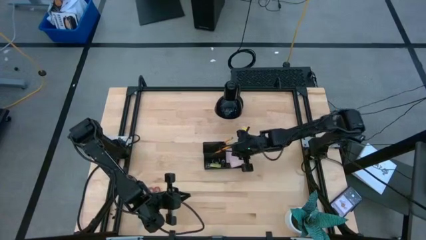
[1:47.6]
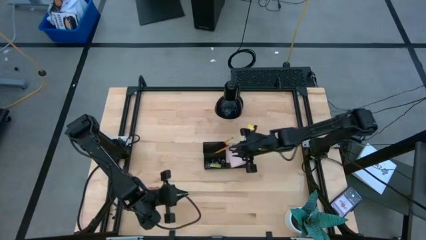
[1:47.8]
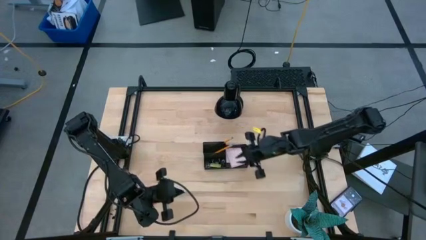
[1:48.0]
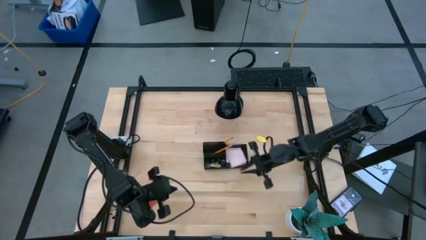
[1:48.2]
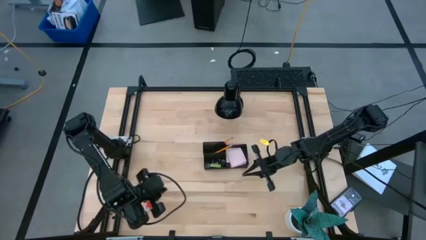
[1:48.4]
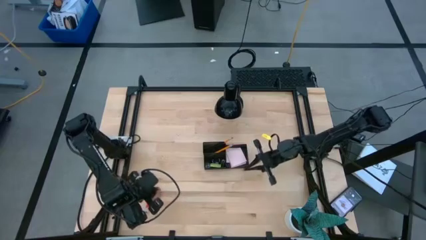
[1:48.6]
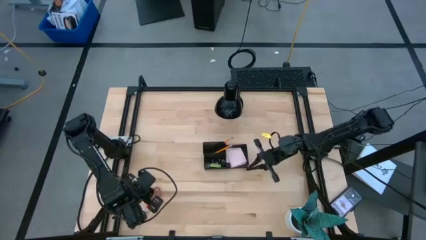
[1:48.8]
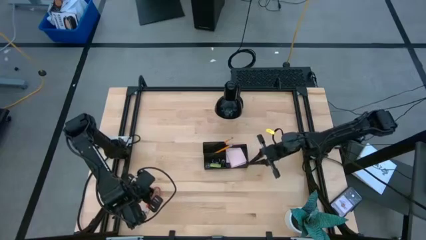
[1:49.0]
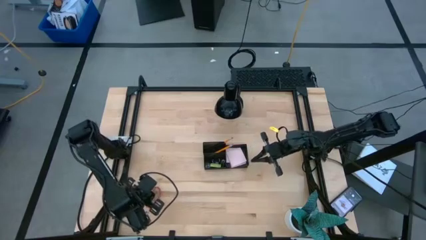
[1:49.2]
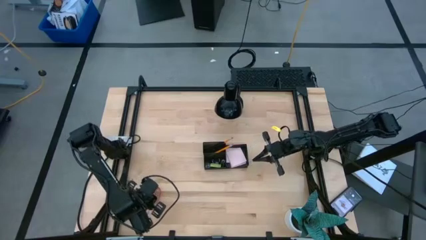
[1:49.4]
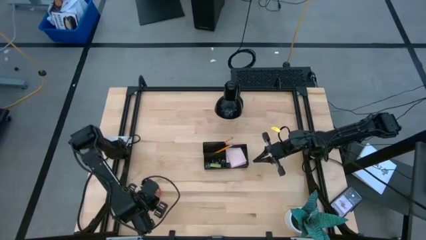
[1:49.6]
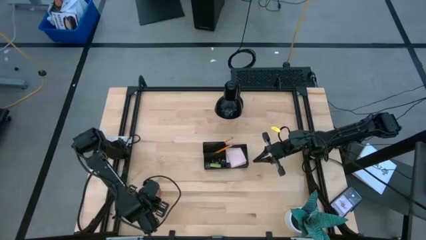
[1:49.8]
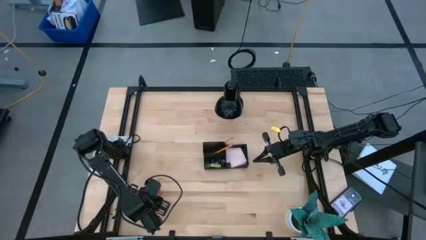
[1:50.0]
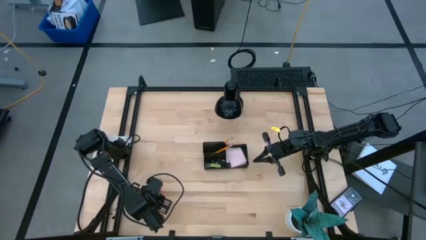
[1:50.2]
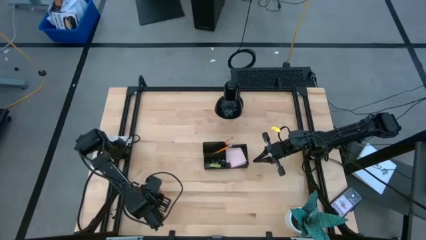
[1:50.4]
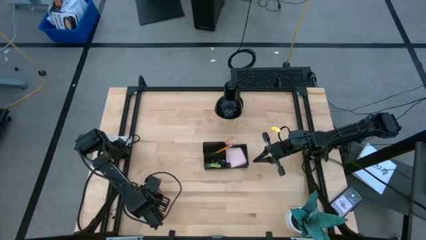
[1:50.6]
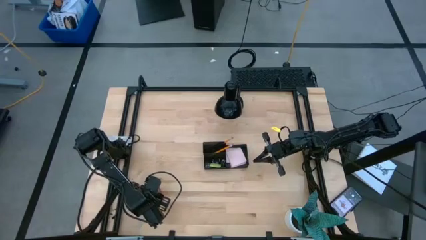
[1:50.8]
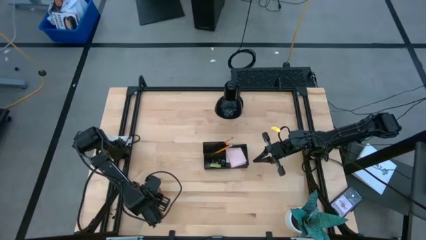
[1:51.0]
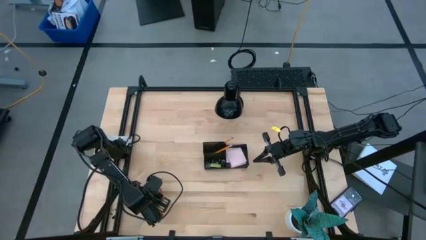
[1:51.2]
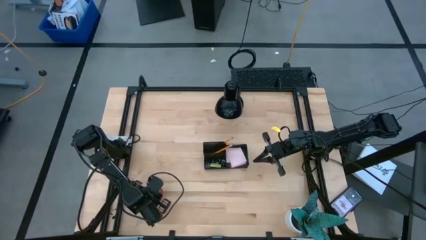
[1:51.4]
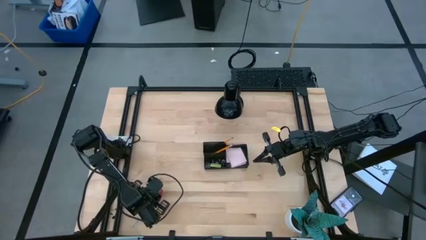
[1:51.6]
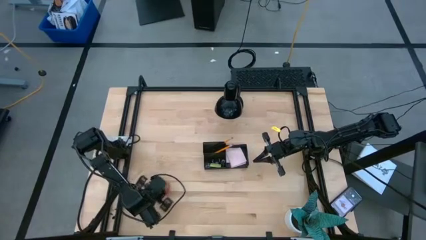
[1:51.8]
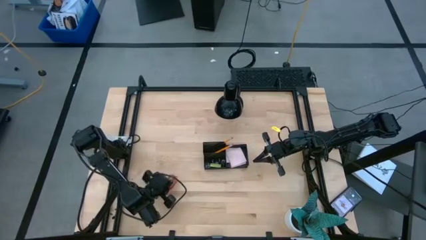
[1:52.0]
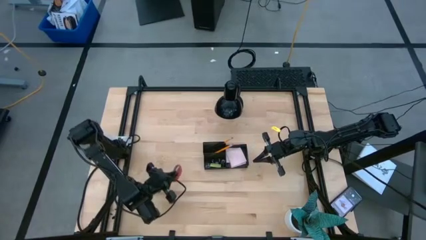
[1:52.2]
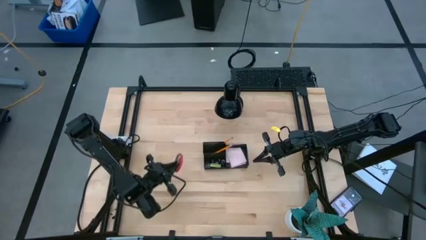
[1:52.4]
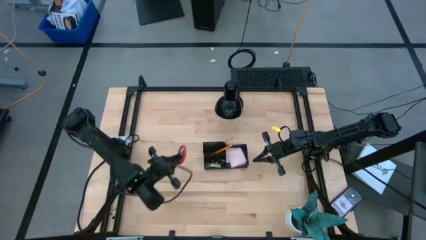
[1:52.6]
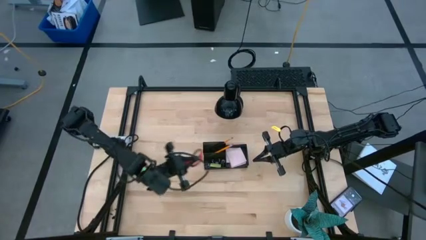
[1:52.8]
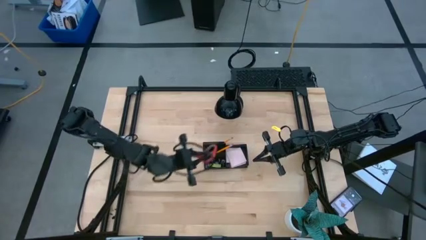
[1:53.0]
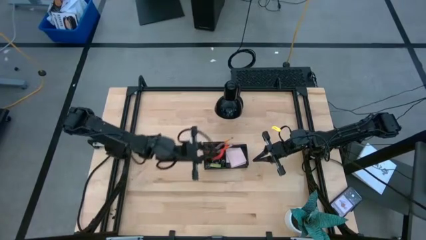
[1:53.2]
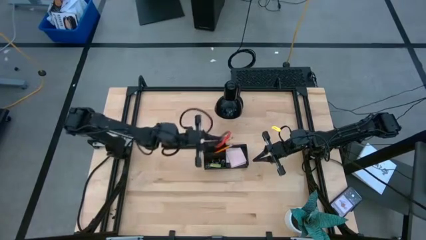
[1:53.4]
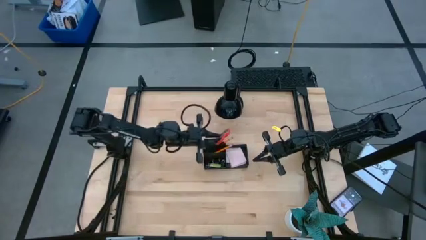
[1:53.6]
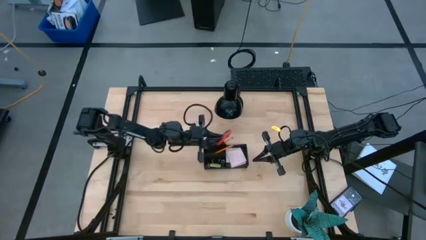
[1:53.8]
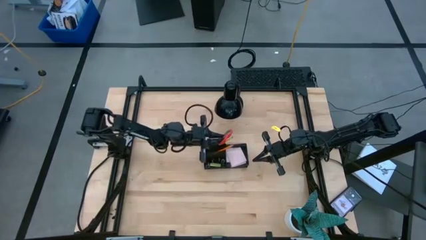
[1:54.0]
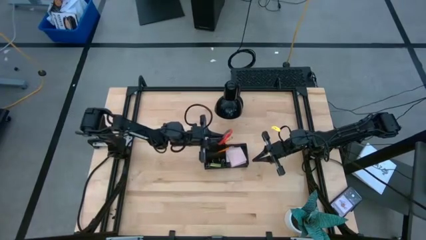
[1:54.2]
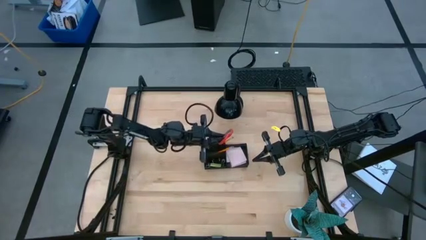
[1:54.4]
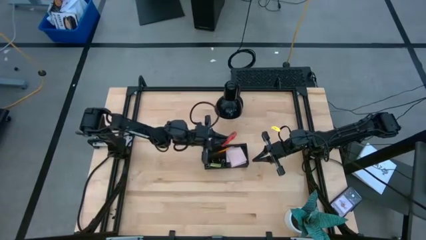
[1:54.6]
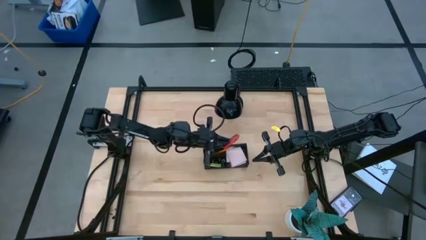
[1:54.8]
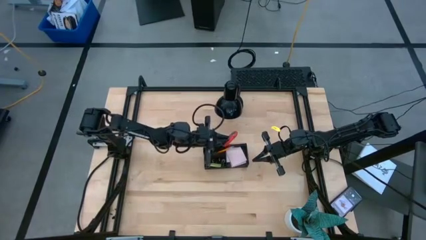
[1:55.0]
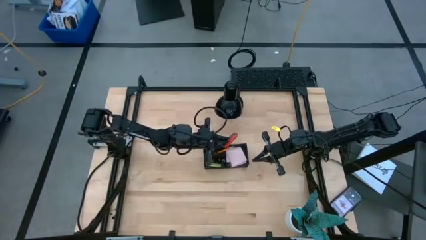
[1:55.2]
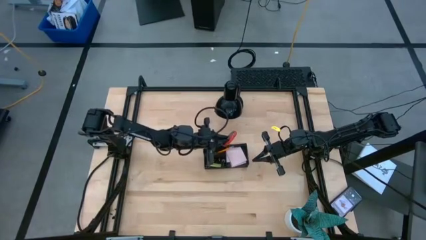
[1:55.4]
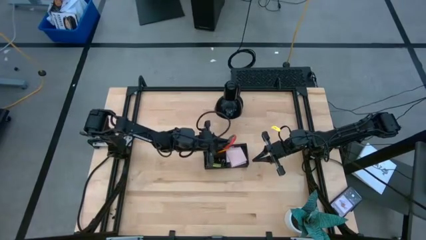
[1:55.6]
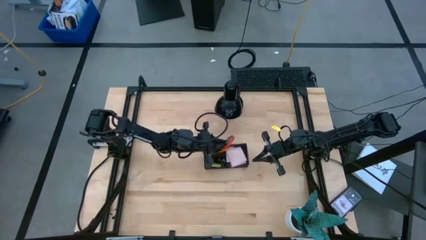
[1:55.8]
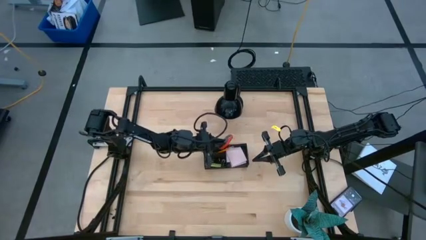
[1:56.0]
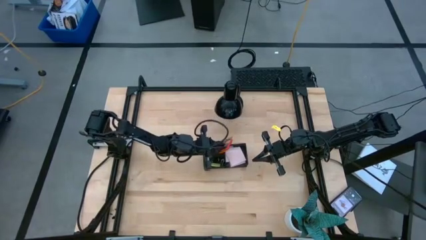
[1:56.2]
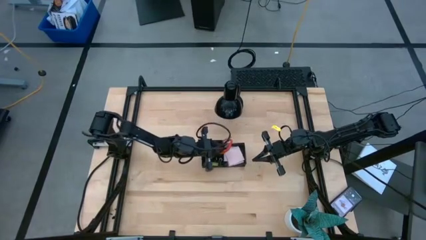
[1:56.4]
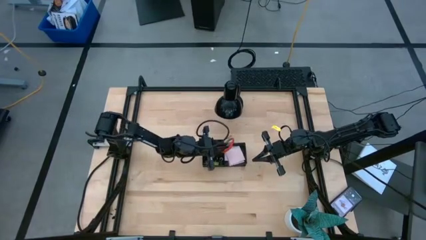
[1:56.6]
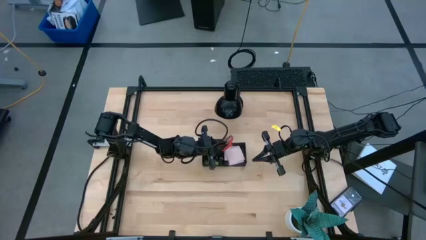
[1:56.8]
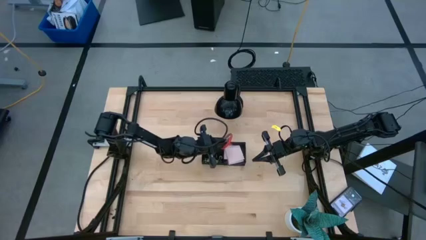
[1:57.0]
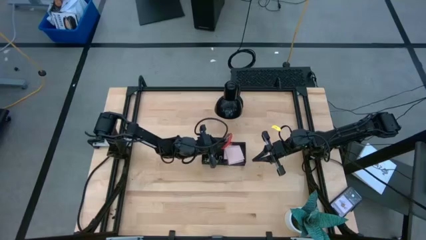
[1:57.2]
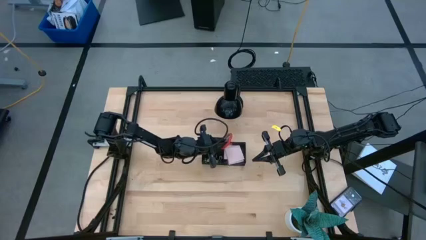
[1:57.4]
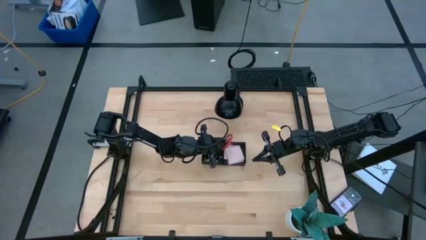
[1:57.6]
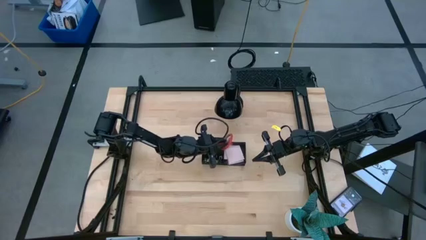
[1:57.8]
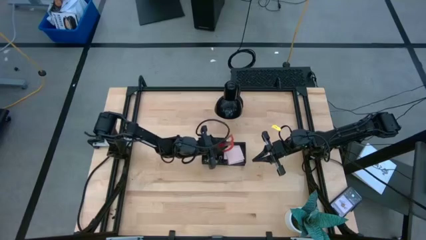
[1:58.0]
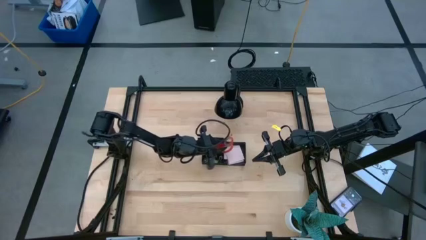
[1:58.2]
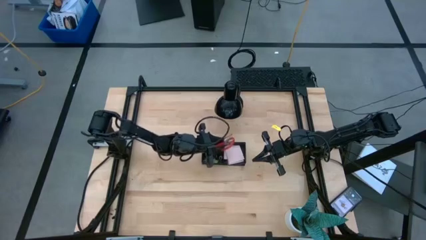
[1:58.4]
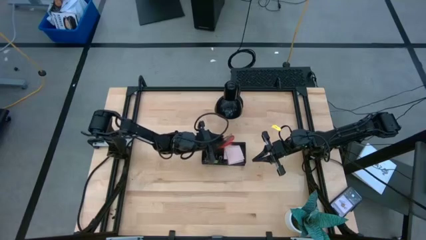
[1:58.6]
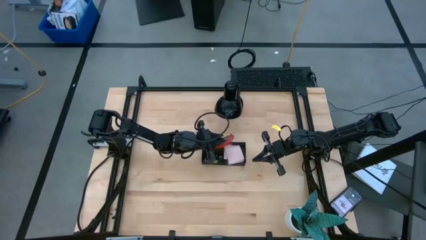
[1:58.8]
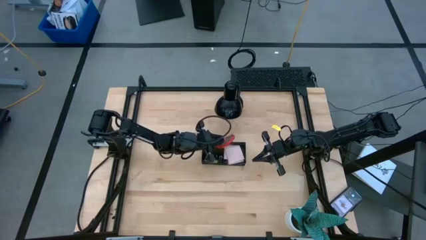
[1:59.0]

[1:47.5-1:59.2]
Task: Pick and place office supplies into organizer
Put the red scissor into the black desk organizer

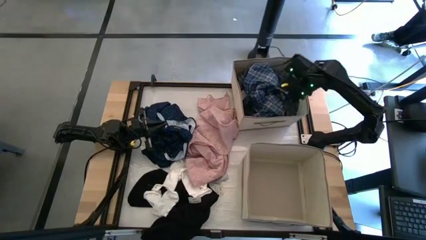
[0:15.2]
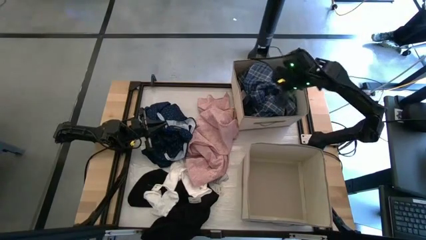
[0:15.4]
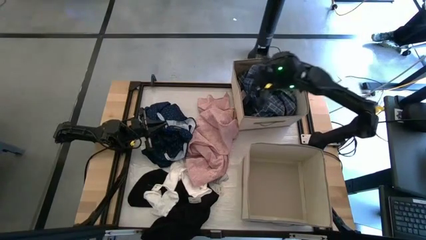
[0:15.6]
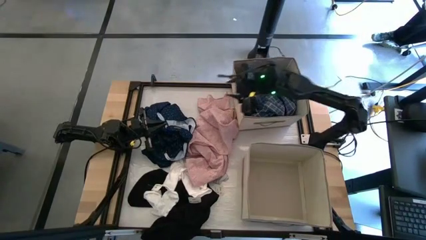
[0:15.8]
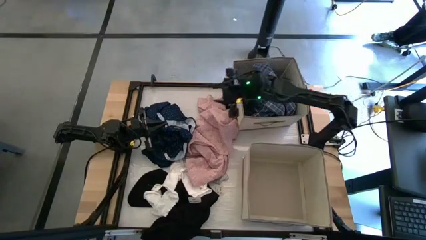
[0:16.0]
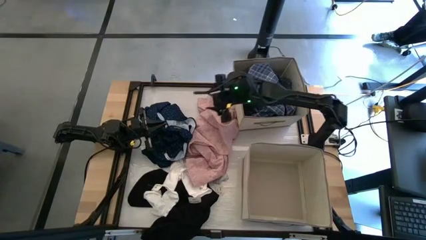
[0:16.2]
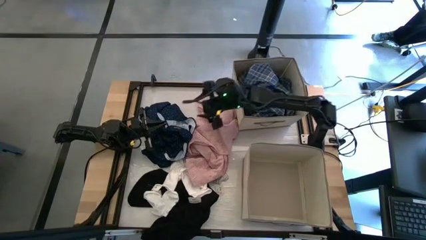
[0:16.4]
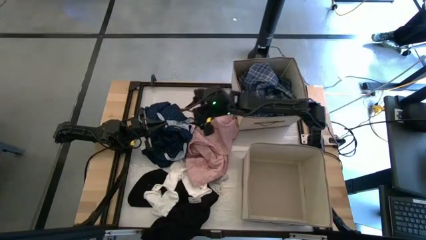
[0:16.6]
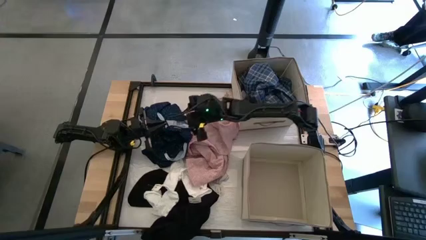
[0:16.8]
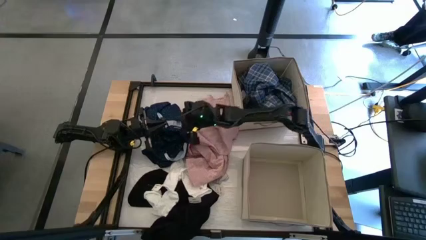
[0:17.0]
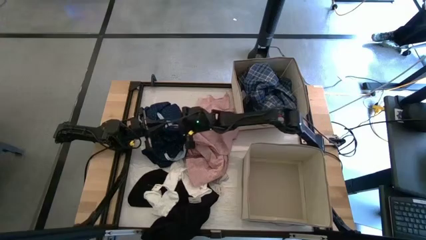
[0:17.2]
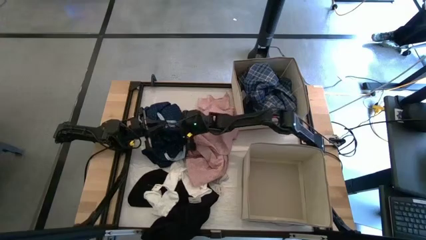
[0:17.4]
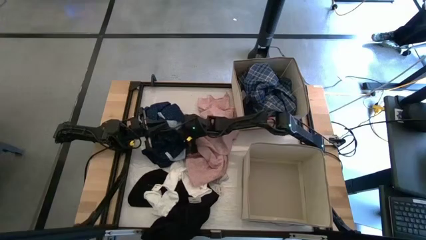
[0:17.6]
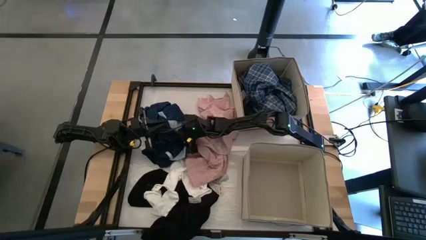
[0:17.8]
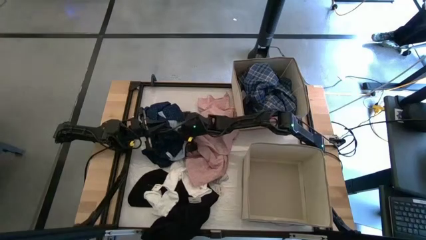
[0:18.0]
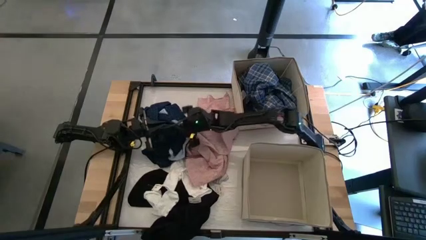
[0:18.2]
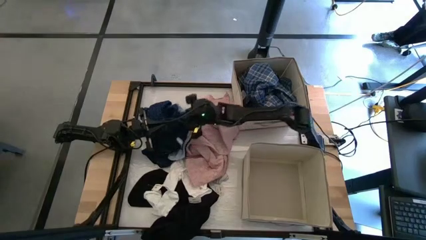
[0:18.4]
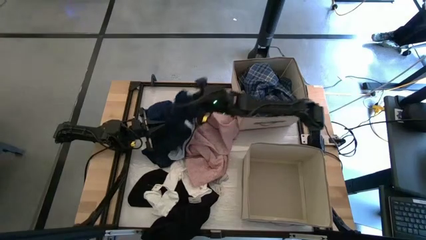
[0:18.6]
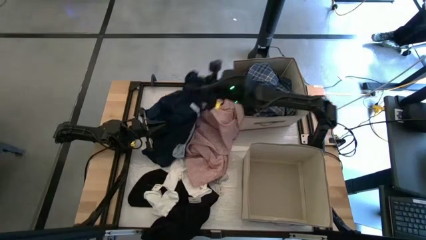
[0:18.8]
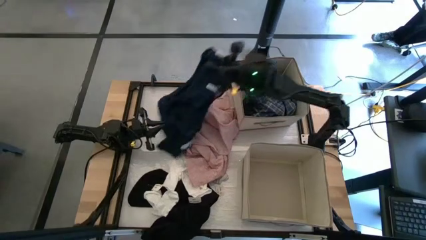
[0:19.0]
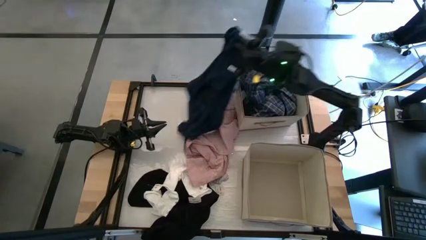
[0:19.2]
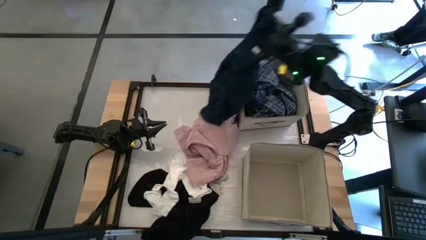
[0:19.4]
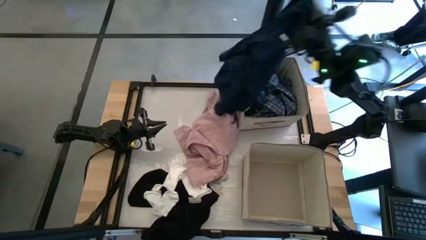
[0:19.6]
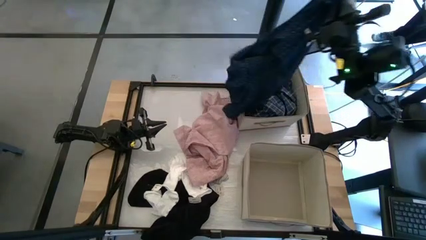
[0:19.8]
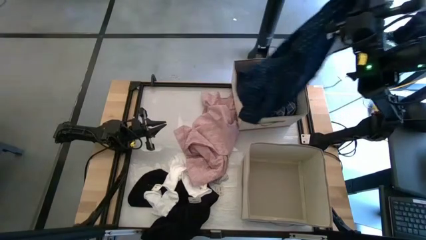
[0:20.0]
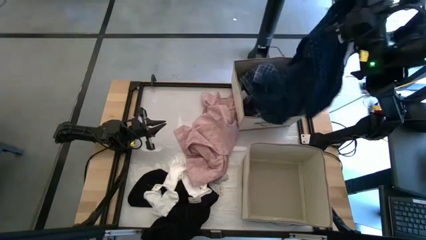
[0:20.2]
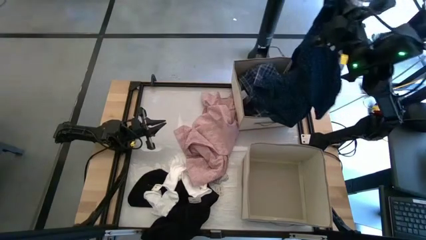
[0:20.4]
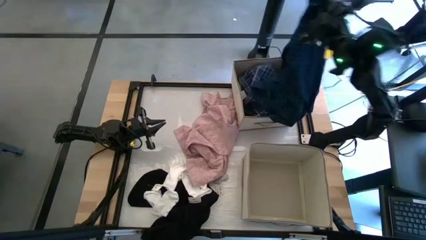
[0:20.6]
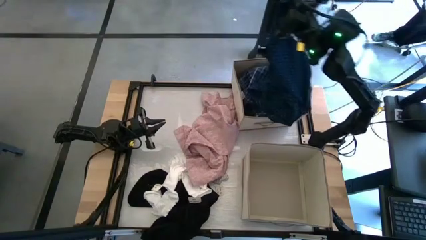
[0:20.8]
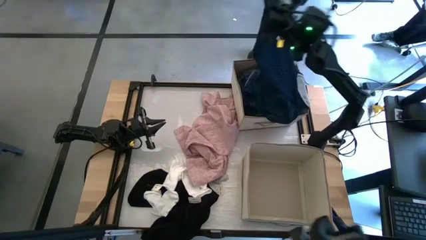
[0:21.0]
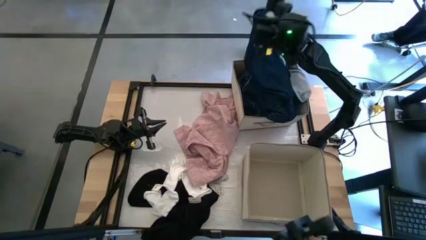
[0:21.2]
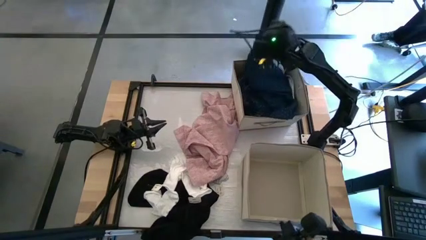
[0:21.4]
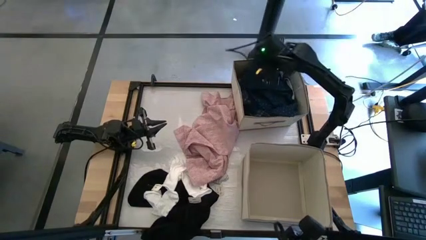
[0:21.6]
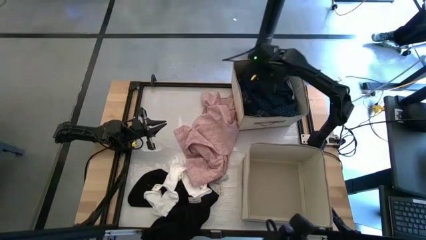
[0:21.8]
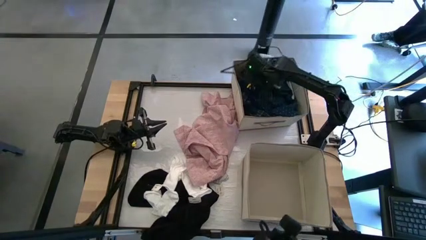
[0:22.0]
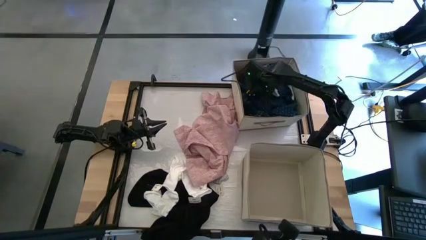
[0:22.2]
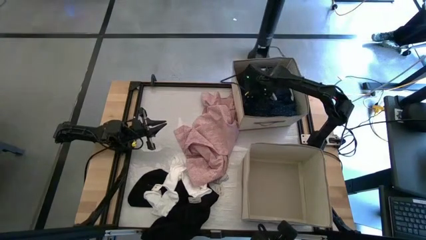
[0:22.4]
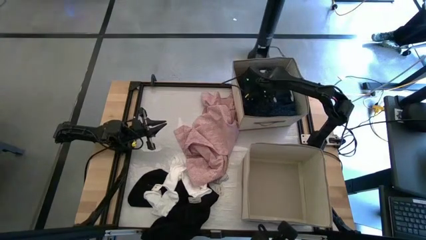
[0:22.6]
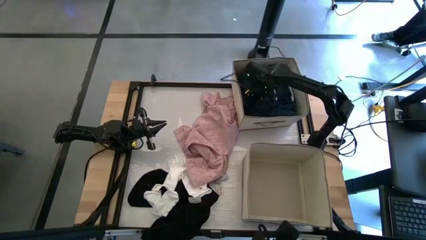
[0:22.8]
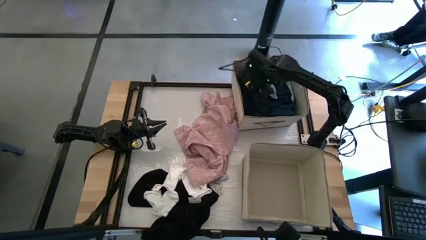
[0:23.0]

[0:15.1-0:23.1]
Task: Sort clothes
Put the dark blue patterned shirt into the top laundry organizer
